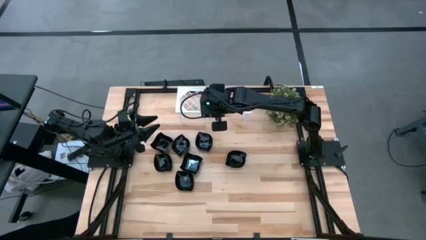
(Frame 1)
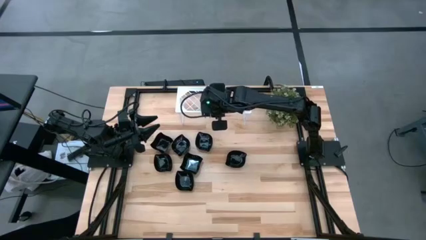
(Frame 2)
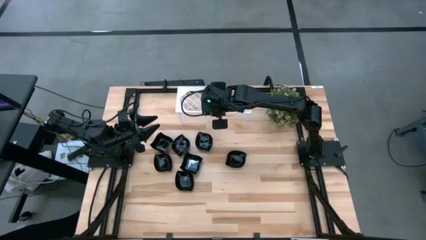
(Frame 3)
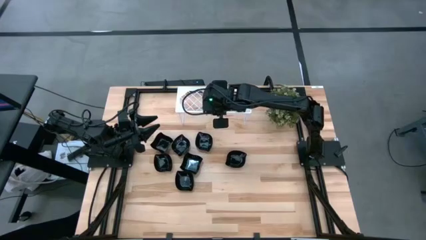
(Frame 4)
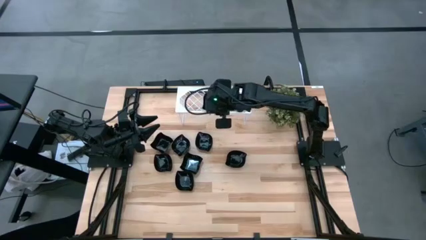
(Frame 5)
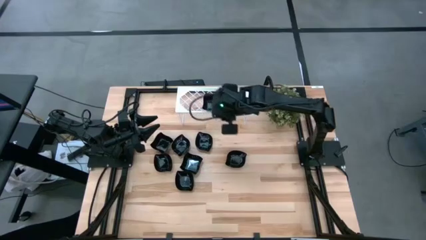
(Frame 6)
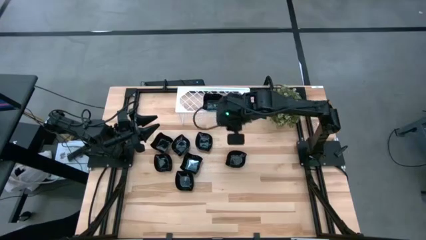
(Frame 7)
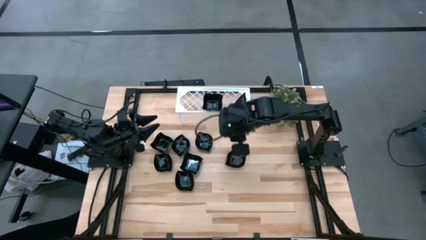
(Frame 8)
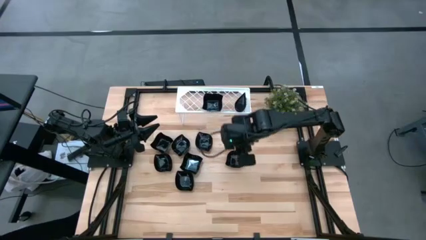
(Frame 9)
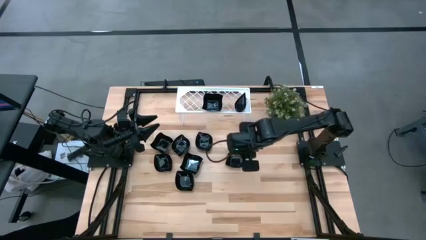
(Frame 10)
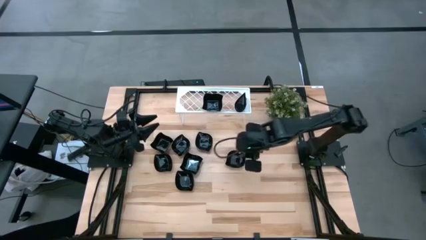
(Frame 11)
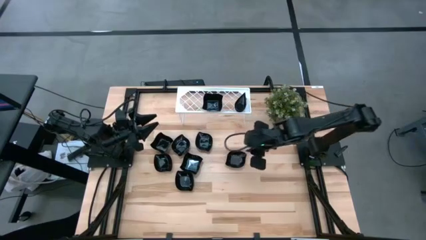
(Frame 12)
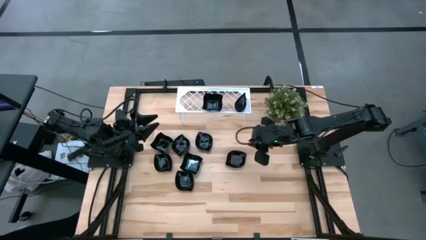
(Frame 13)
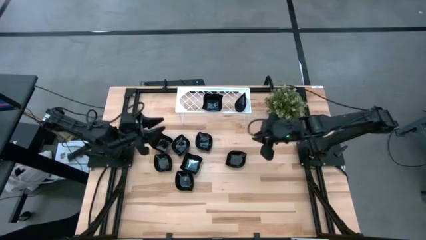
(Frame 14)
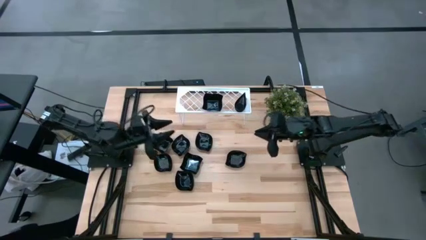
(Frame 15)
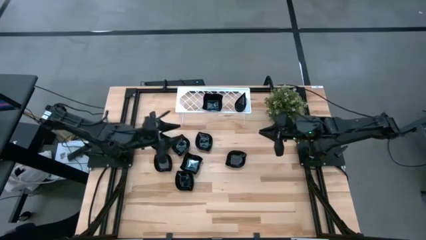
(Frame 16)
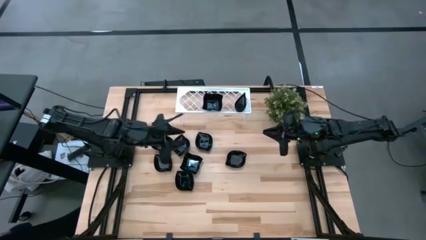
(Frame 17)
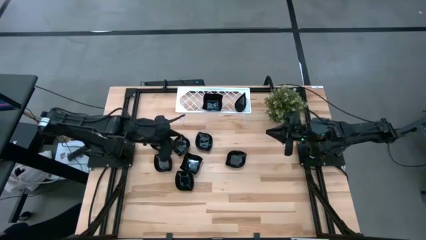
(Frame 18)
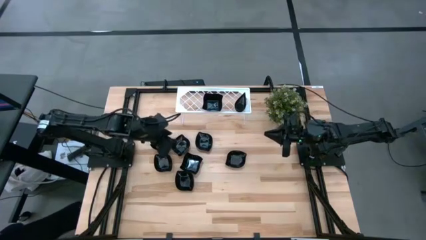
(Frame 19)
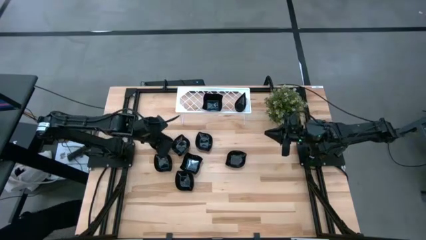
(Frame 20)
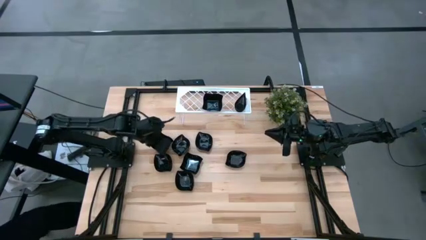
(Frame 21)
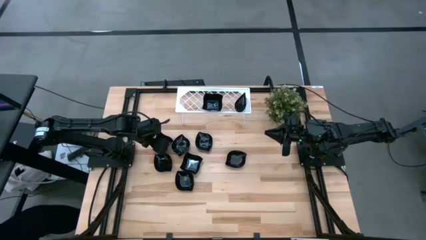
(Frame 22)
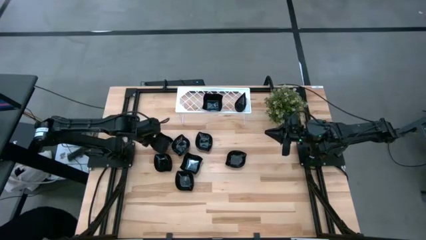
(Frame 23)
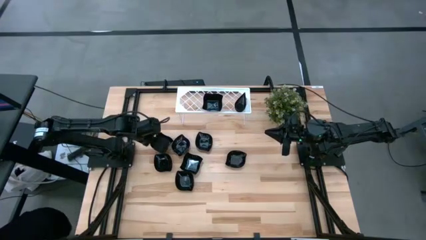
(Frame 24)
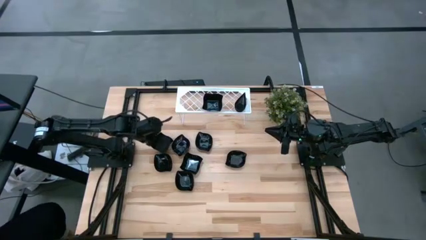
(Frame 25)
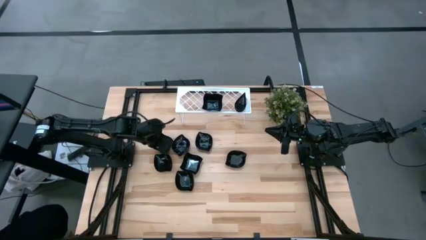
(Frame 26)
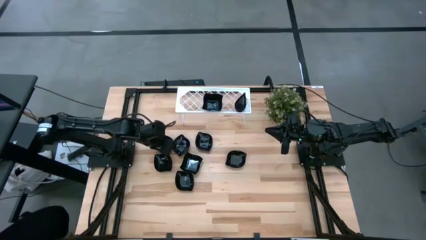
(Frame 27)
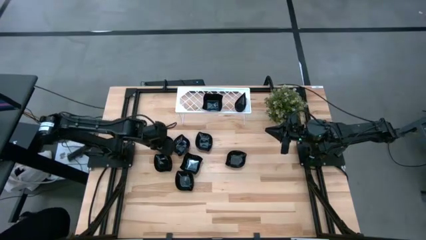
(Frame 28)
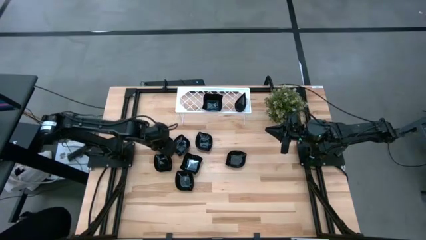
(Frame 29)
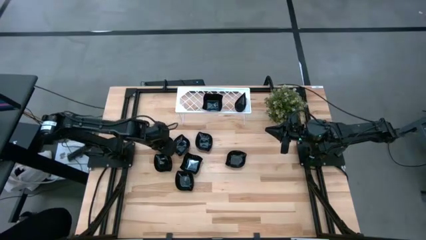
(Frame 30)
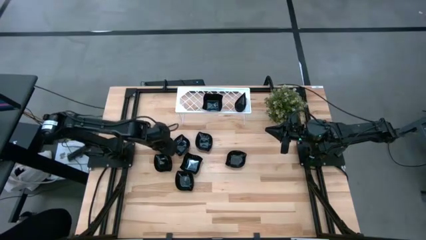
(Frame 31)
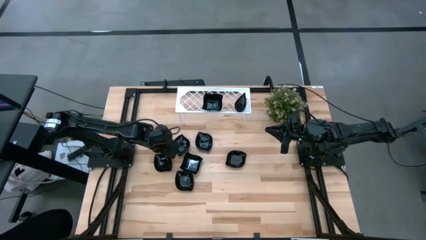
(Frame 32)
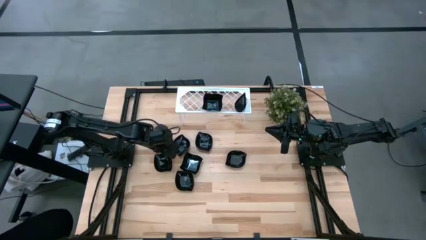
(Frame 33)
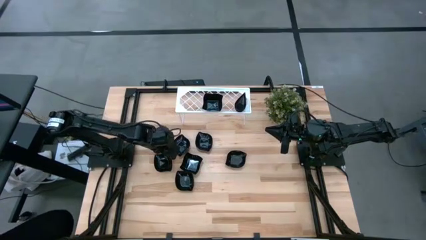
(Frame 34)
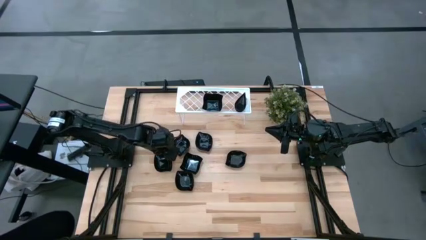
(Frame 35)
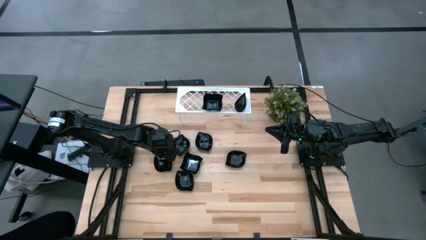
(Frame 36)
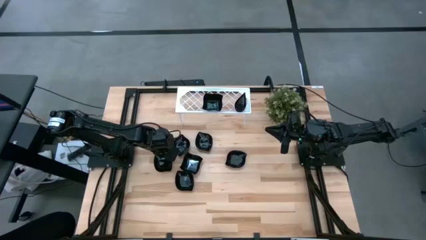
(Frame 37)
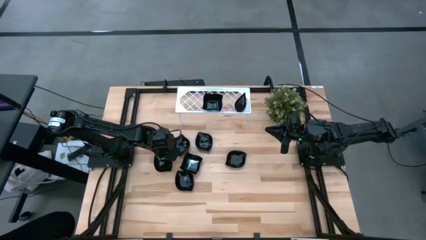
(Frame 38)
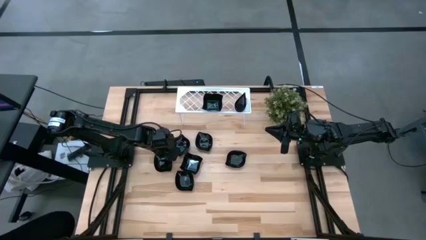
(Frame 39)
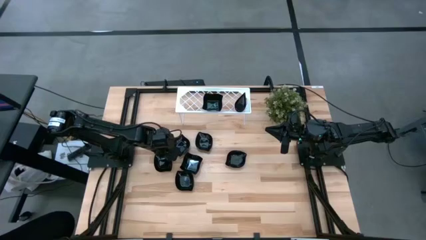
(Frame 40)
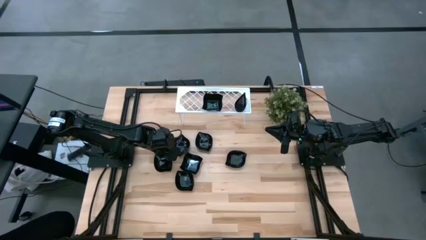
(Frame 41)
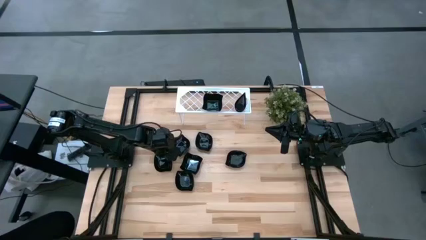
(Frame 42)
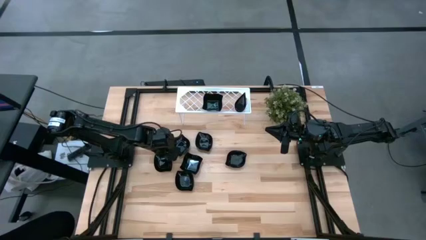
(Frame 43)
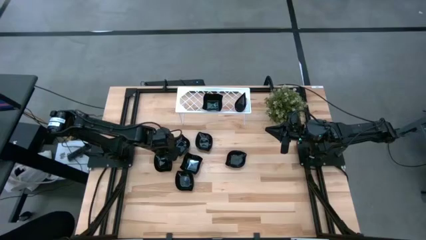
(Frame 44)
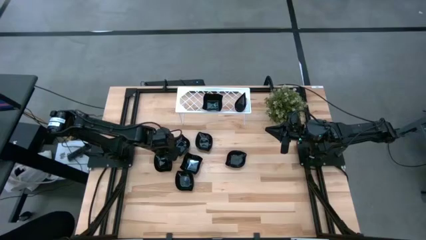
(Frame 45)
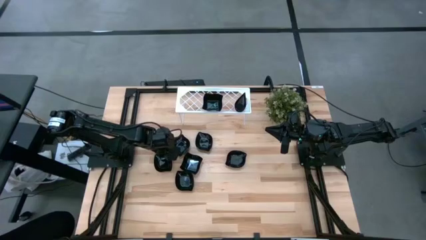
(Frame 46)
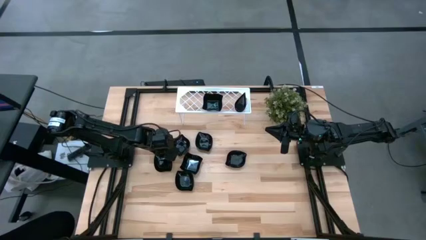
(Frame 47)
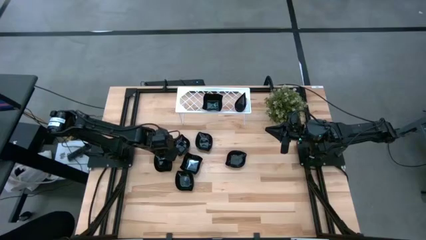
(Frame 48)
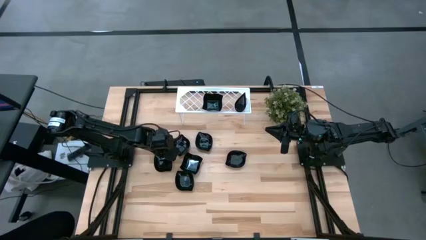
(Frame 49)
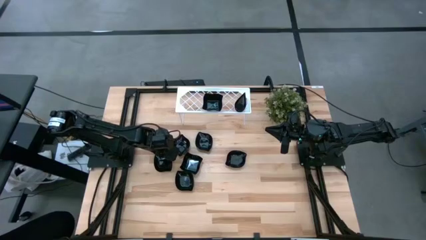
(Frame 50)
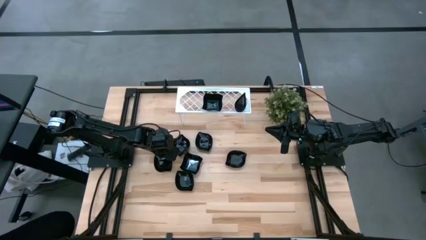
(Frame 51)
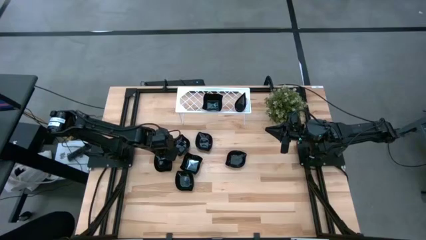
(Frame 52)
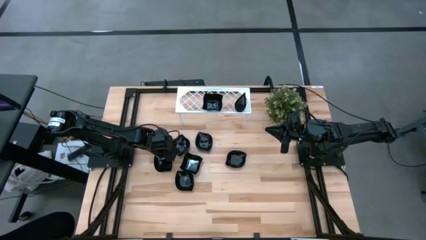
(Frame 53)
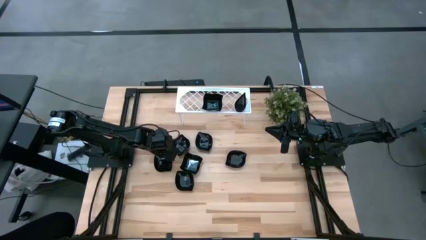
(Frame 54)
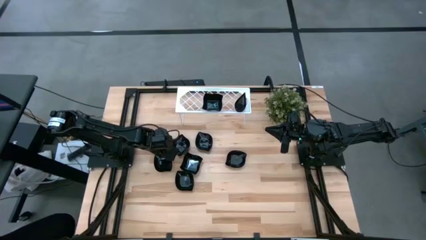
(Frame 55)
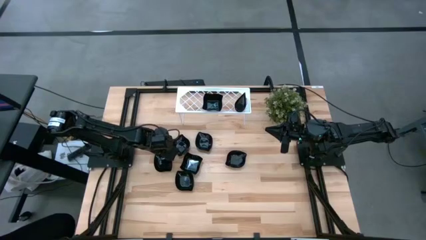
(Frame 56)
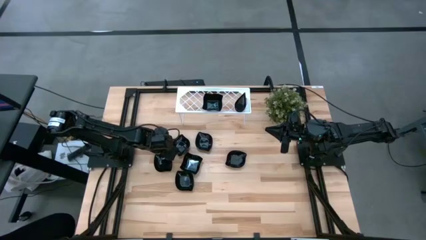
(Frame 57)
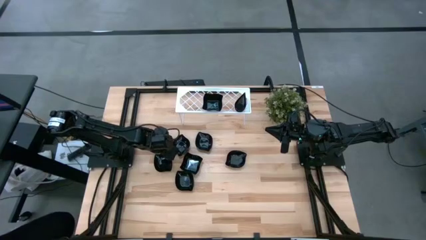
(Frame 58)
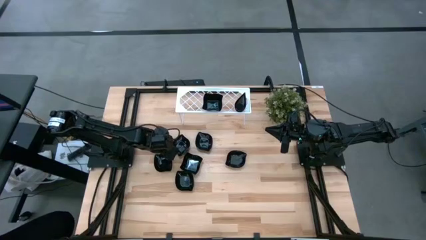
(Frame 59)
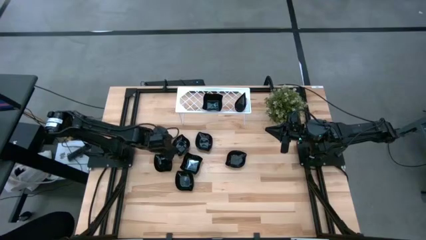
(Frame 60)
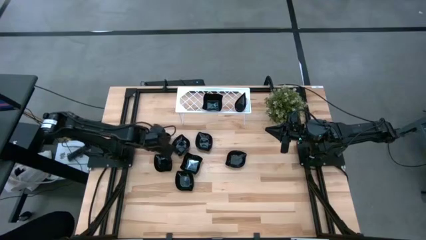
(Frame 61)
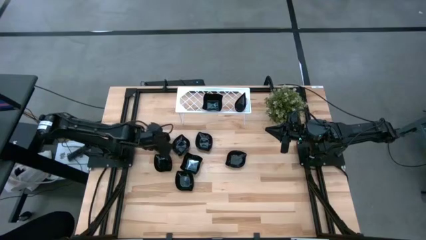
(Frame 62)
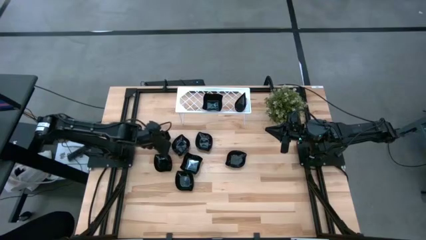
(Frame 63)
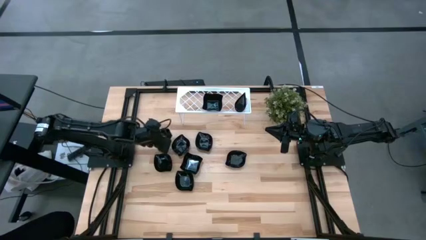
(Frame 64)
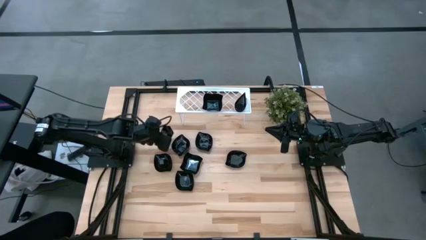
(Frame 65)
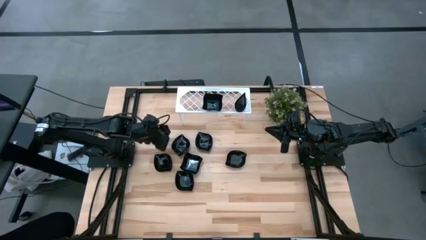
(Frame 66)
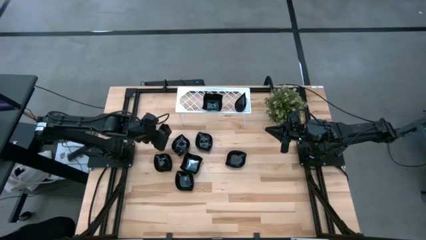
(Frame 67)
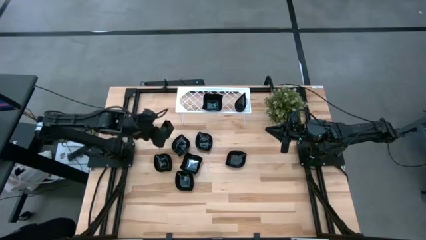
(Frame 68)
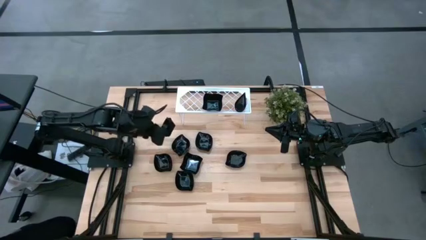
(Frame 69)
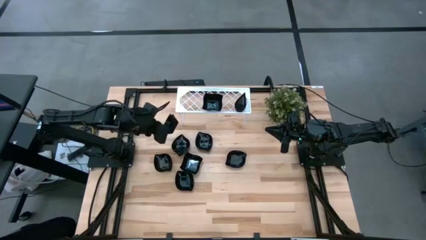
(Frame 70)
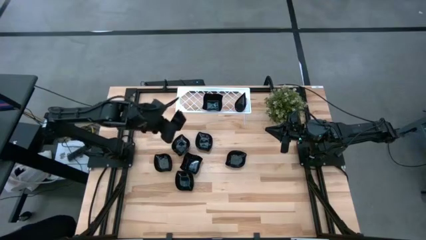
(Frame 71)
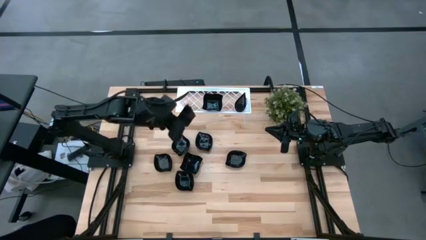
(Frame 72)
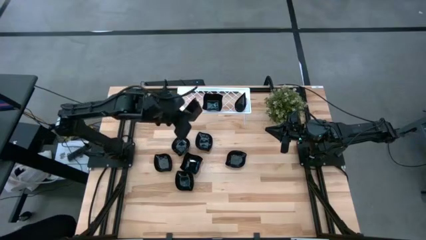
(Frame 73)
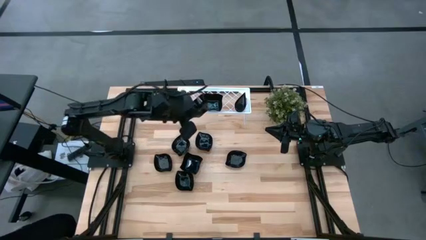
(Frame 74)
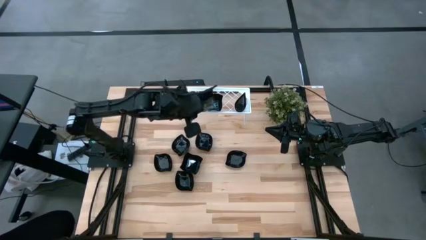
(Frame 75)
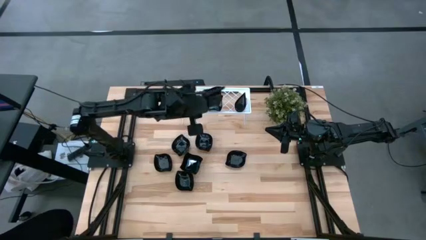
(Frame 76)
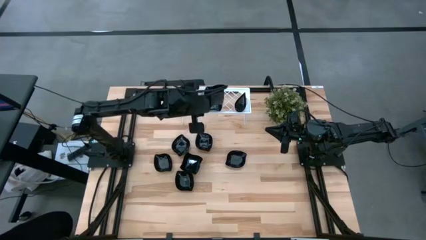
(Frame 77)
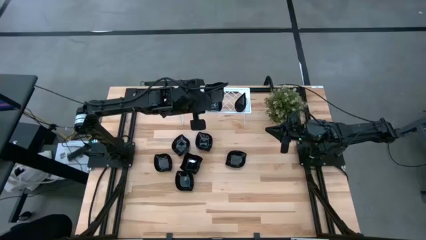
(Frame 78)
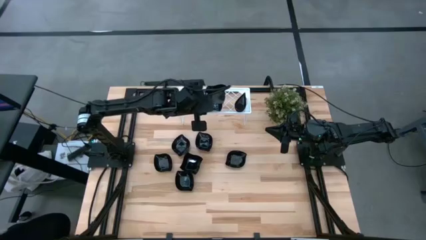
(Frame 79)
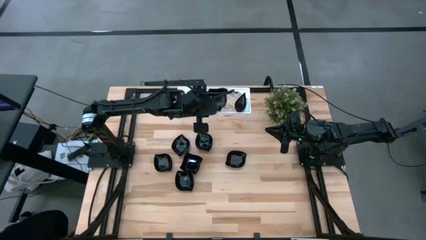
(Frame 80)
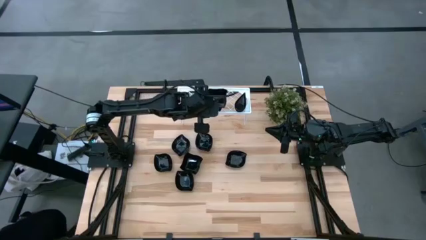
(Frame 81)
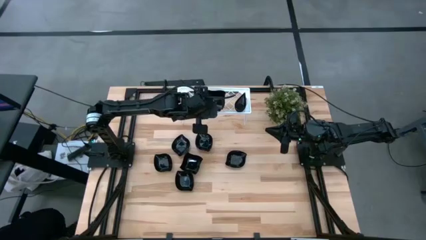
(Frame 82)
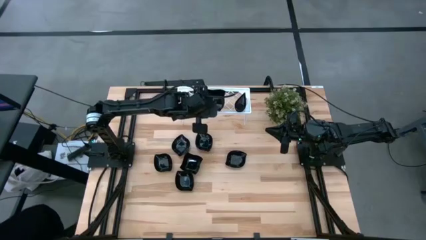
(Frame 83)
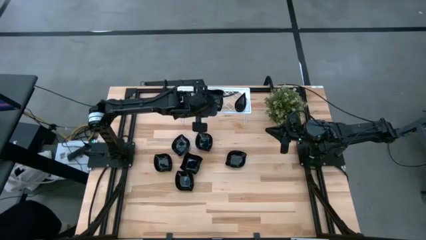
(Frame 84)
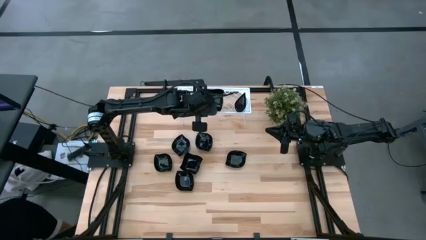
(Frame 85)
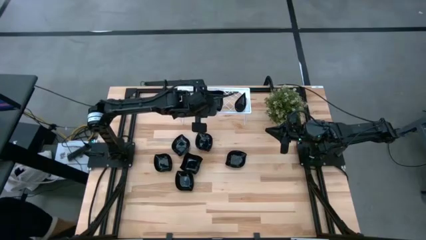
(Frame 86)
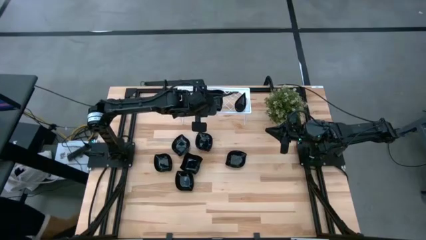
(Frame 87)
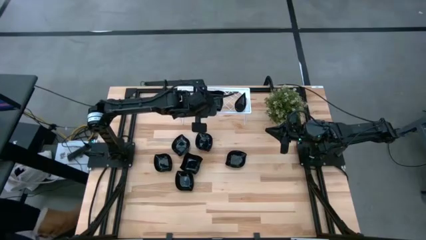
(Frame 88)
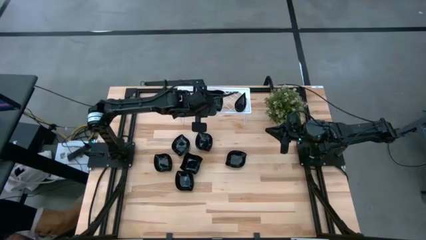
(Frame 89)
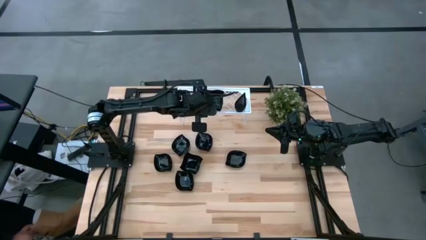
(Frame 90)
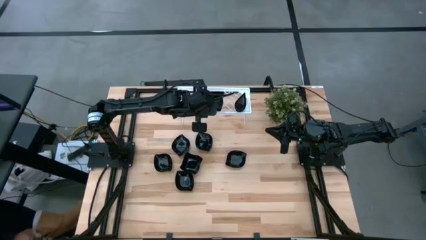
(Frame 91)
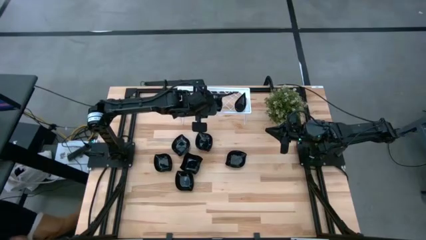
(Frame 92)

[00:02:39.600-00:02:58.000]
Task: Pick & Place Mini shaped plates
Stack the distorted square plate on top of the distorted square plate on the shelf
